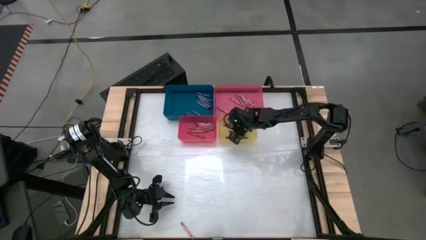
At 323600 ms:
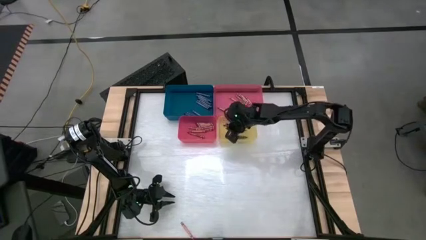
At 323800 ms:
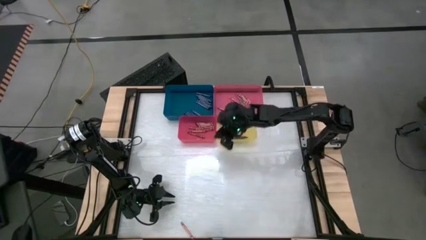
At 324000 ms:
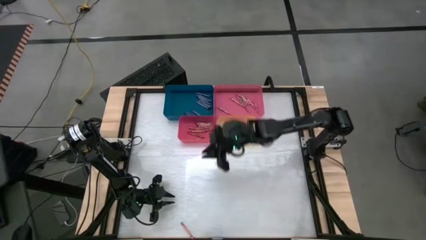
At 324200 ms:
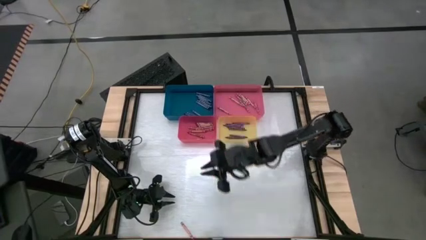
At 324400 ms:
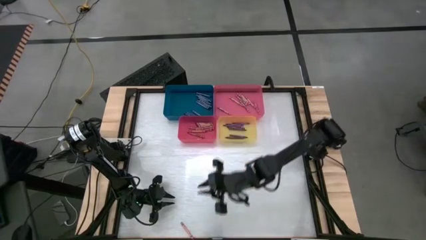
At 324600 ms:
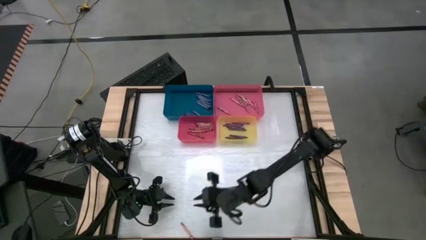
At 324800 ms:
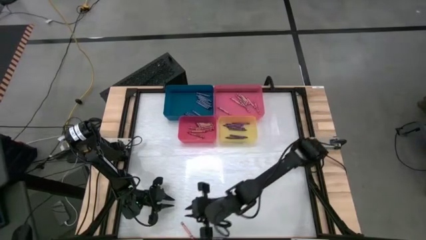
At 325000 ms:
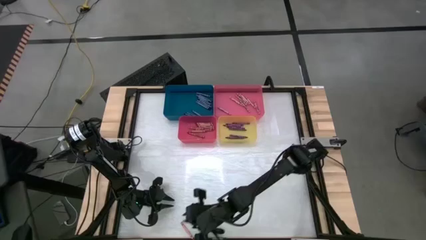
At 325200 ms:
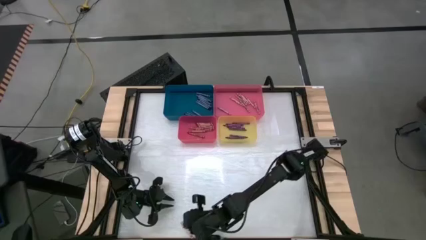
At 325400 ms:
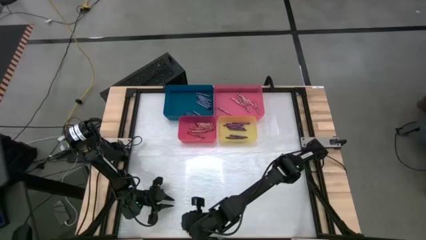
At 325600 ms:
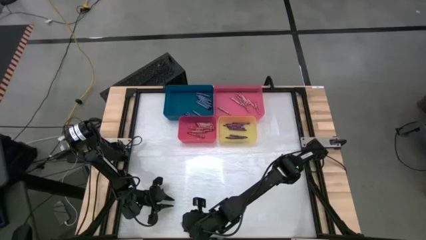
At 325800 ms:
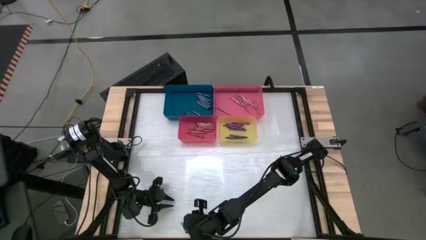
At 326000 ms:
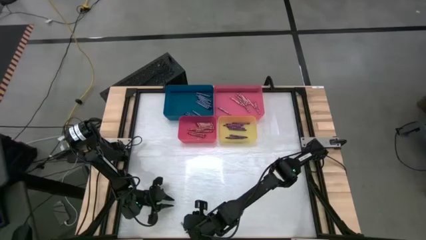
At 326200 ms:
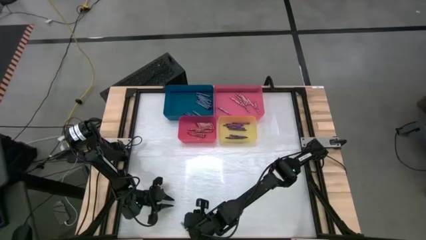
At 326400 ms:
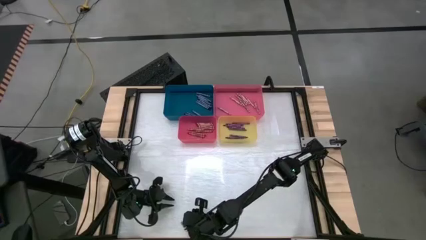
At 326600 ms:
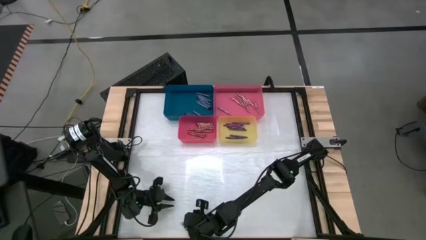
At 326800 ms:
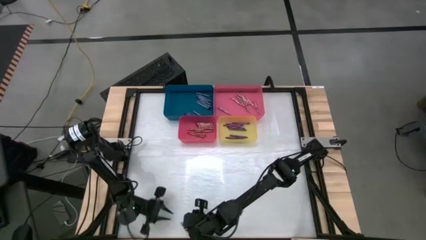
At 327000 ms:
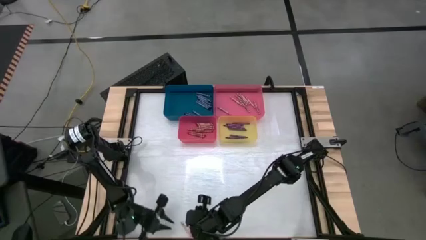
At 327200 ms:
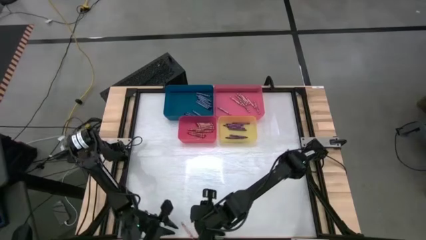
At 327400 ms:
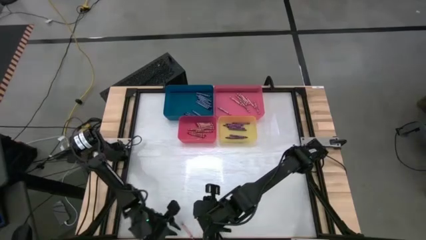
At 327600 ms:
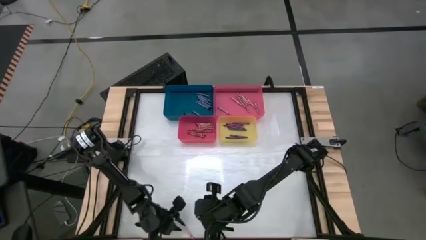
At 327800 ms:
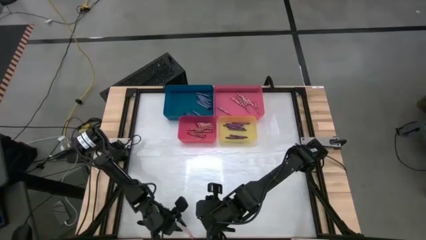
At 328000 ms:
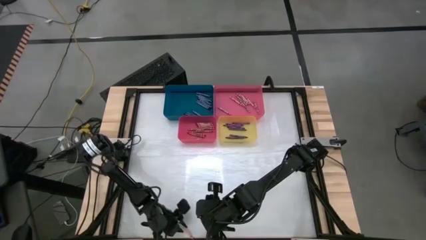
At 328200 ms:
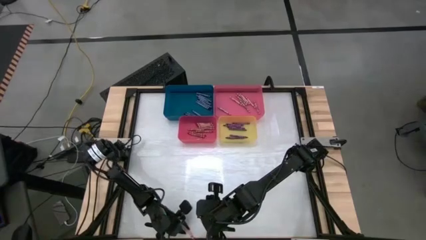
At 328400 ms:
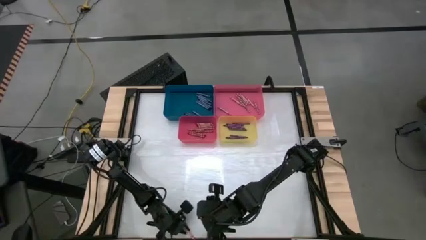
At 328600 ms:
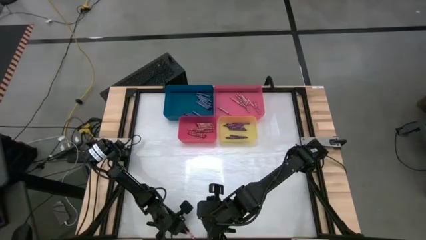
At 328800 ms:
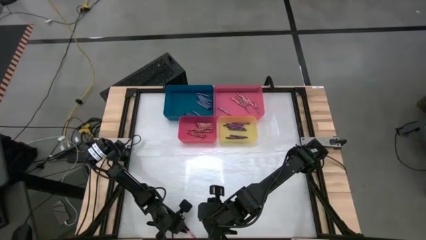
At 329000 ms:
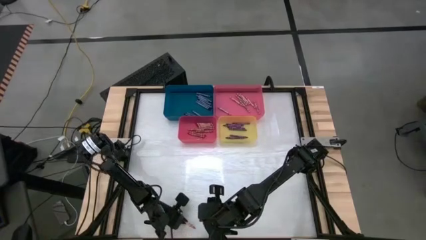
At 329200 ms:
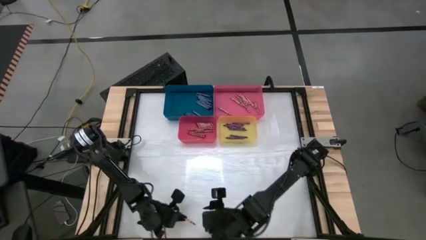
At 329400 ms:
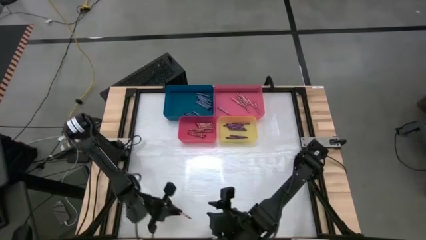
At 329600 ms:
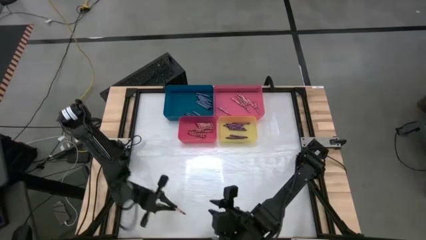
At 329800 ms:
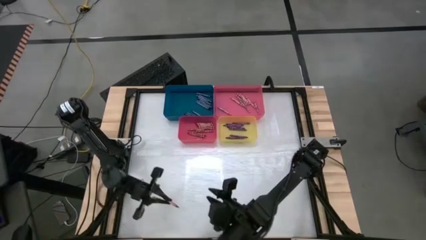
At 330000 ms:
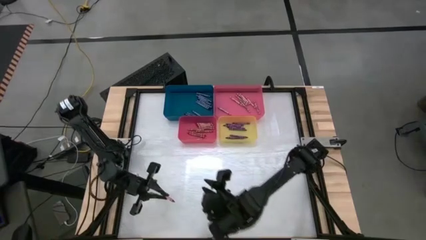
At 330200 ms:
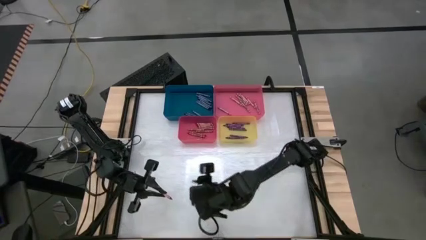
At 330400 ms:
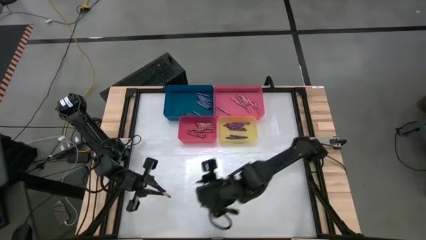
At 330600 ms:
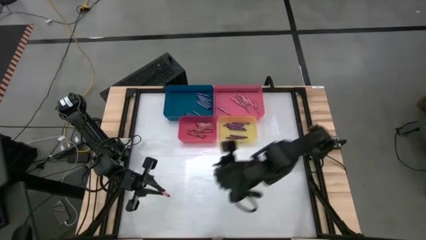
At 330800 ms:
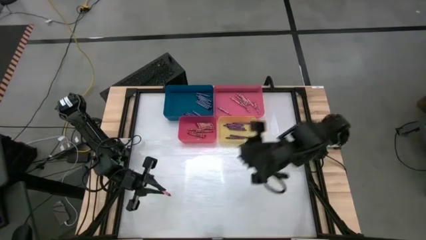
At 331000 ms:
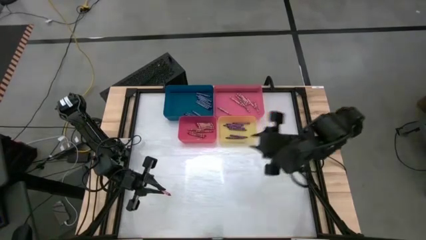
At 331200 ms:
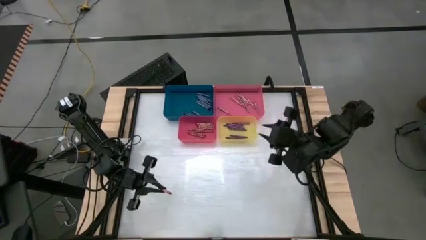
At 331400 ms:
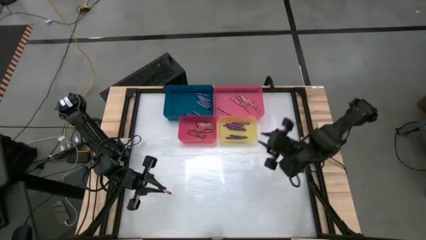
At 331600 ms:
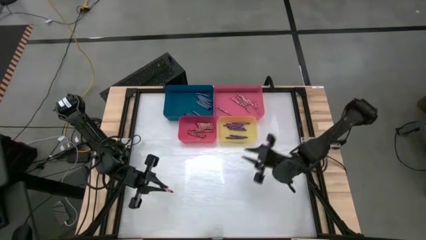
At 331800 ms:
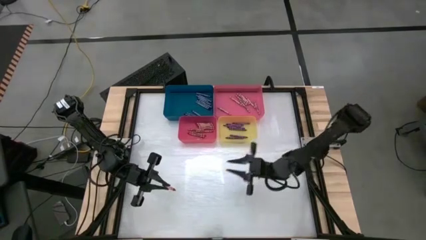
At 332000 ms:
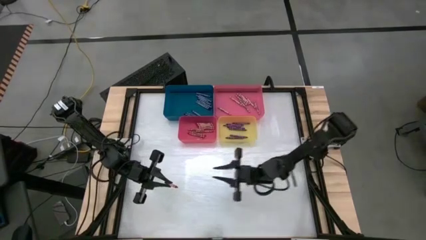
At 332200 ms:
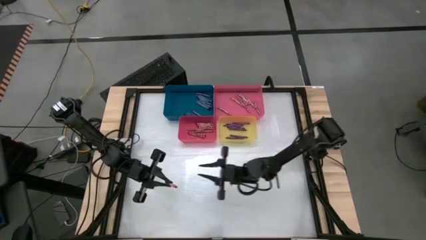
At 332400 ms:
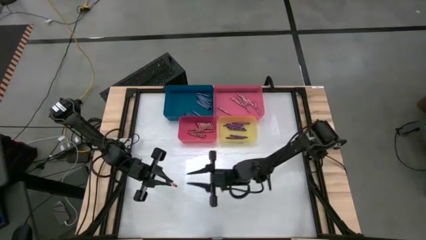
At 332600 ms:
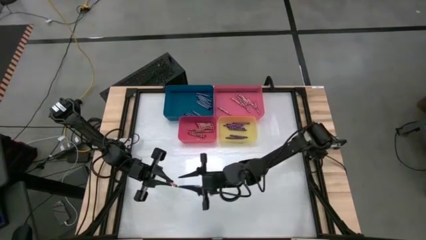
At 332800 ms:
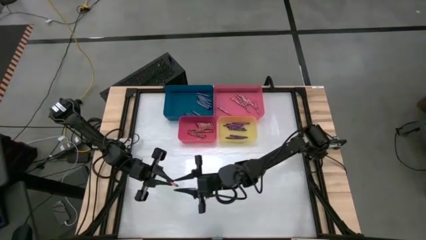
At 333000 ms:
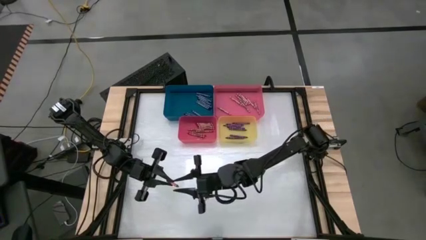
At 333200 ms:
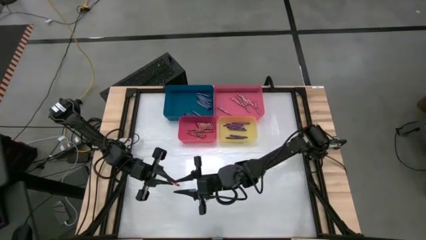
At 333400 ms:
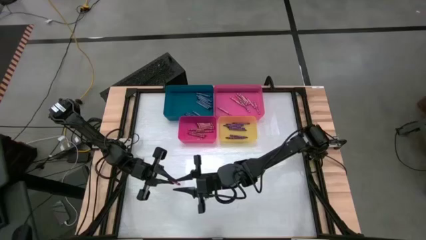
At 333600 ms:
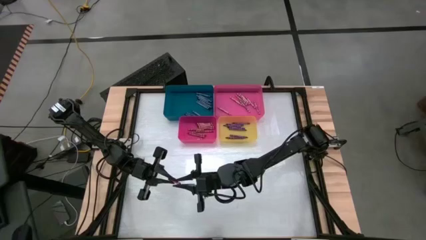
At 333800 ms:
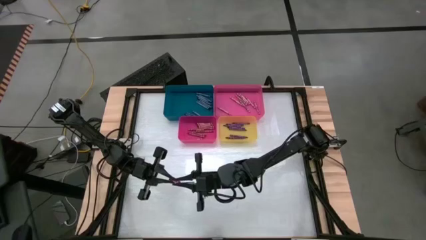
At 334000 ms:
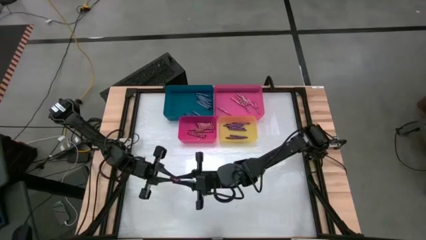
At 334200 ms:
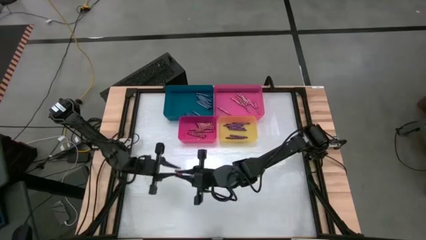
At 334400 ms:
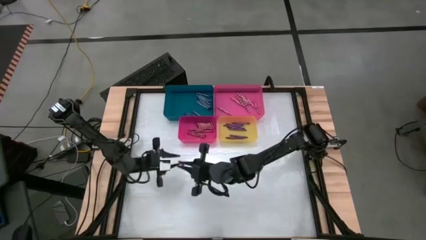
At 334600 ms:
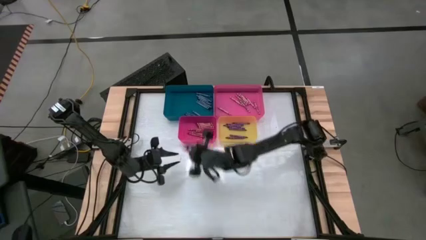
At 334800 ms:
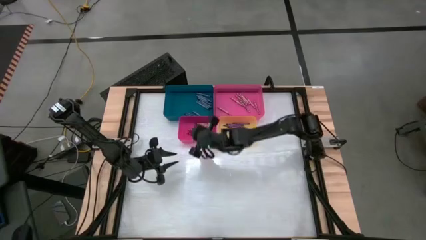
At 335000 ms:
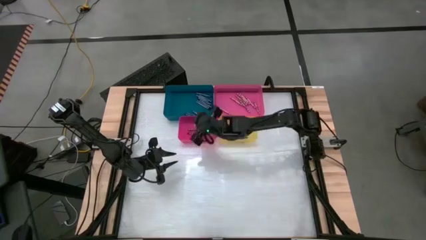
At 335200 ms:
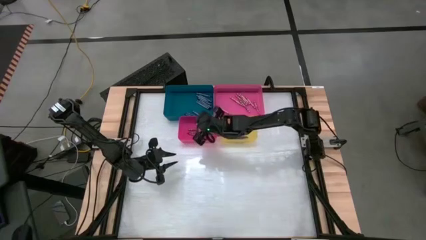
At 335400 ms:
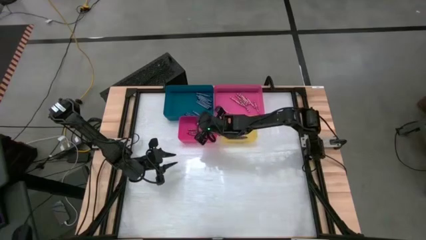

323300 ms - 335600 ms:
Task: Sort crayons
Put the red crayon into the red bin
